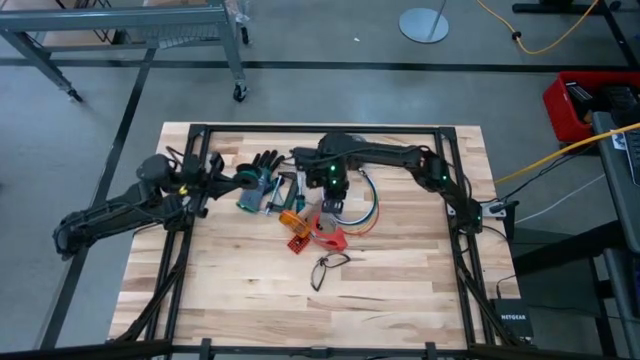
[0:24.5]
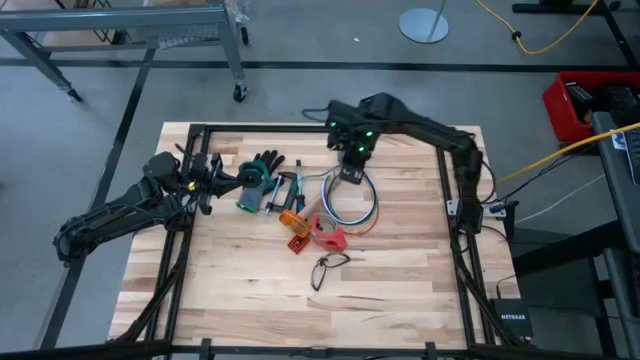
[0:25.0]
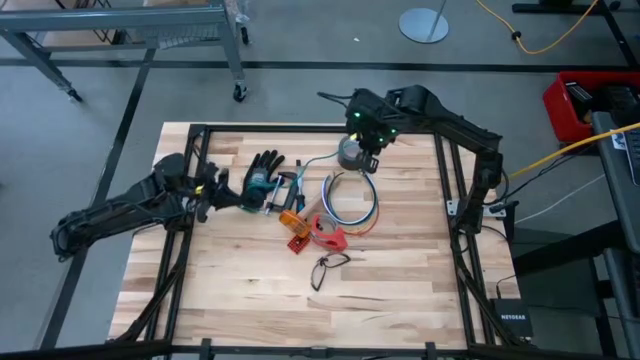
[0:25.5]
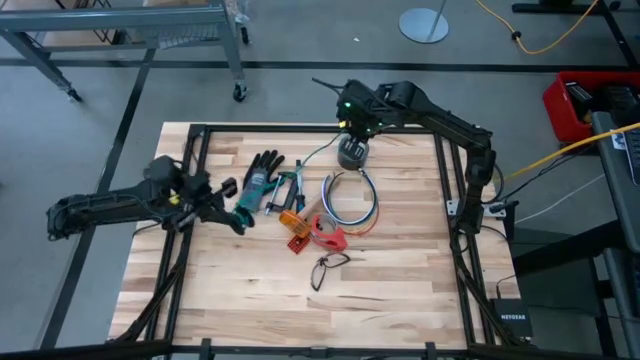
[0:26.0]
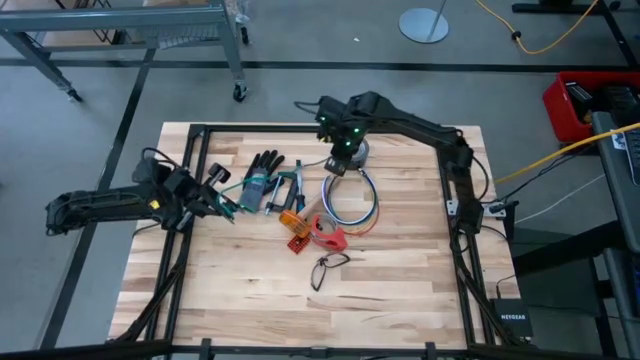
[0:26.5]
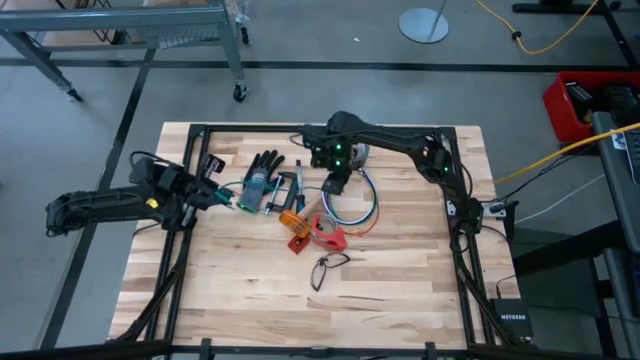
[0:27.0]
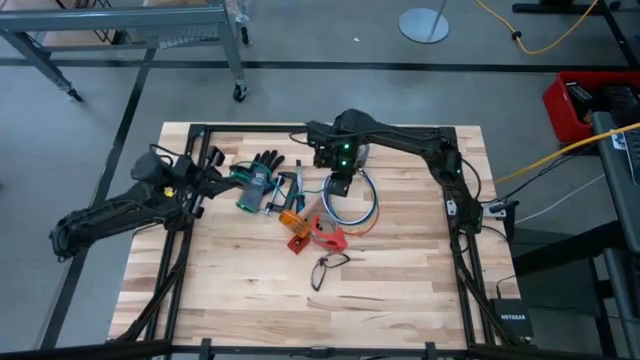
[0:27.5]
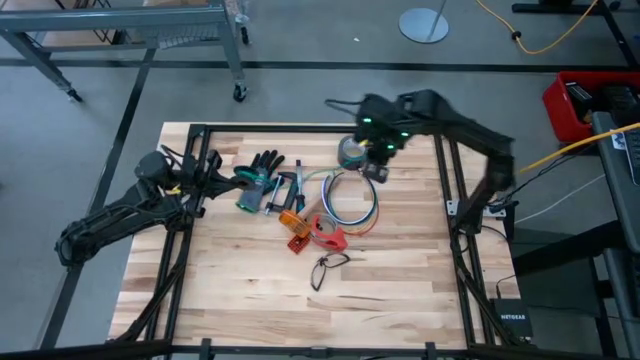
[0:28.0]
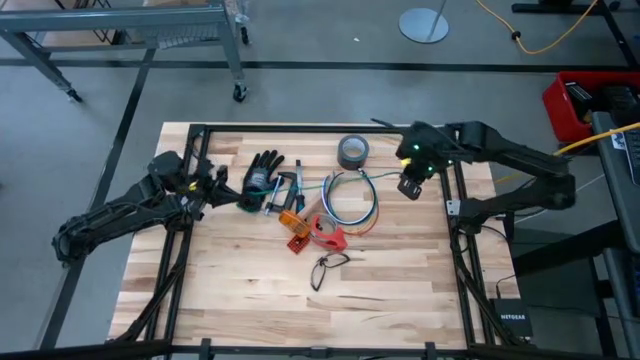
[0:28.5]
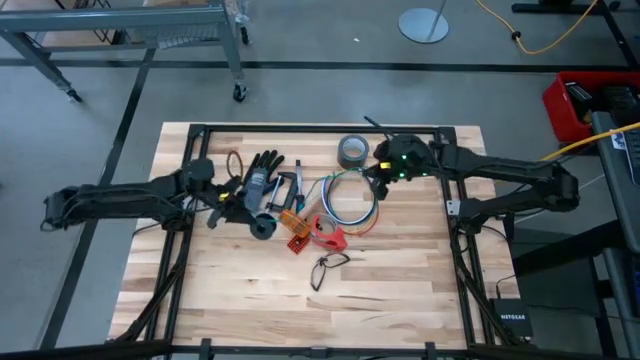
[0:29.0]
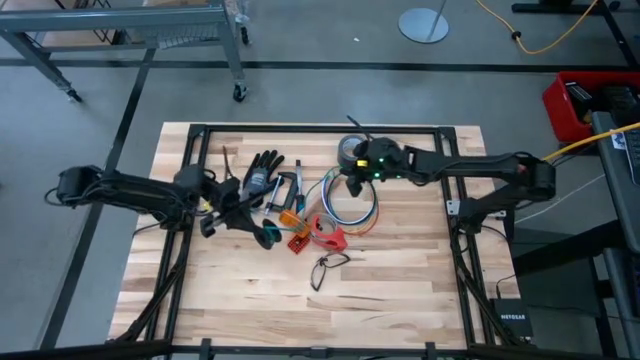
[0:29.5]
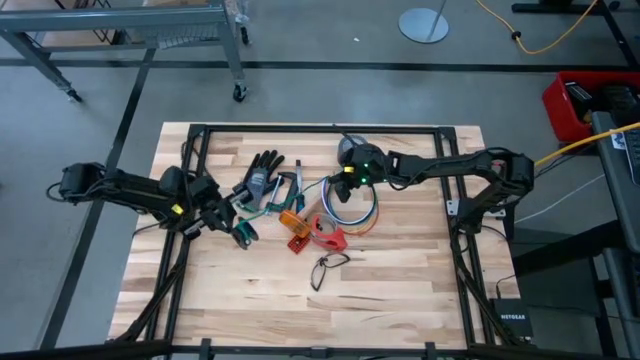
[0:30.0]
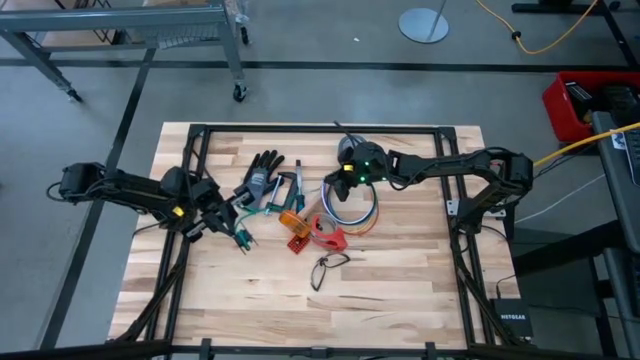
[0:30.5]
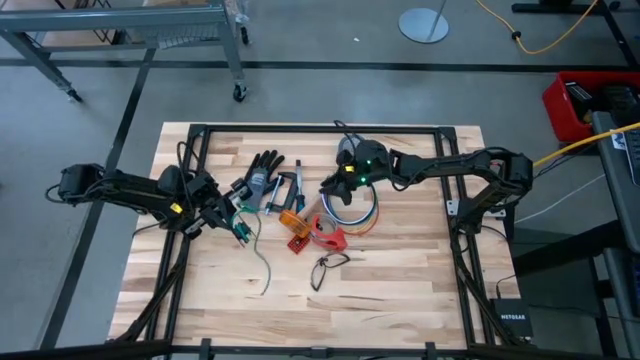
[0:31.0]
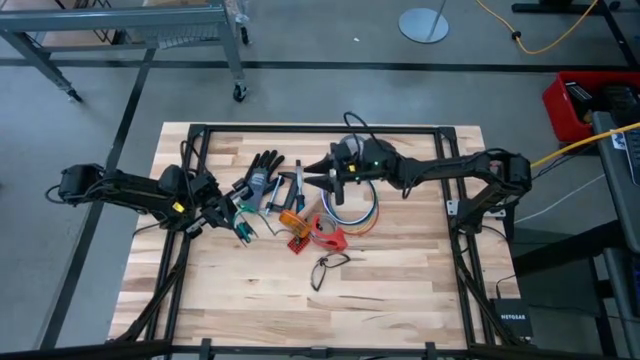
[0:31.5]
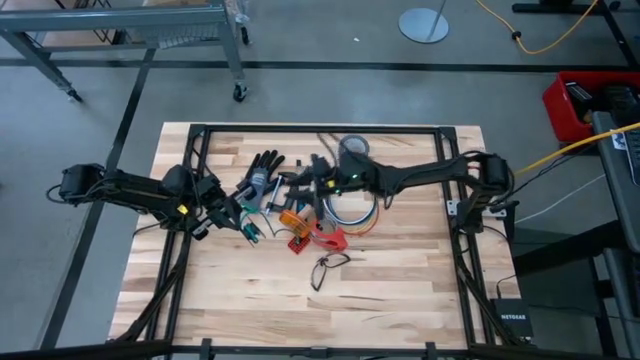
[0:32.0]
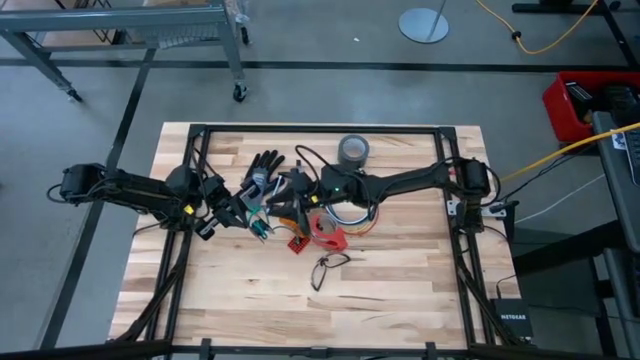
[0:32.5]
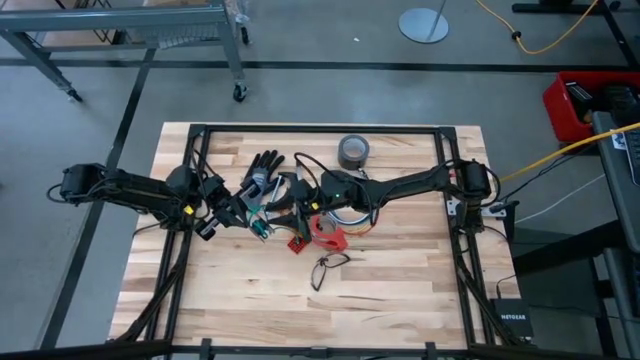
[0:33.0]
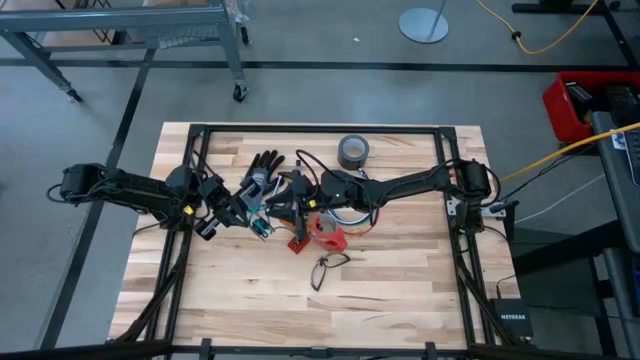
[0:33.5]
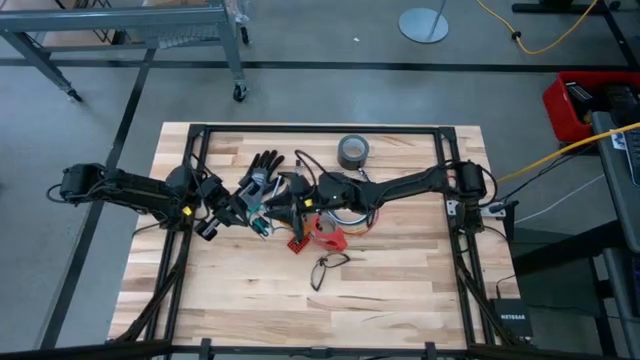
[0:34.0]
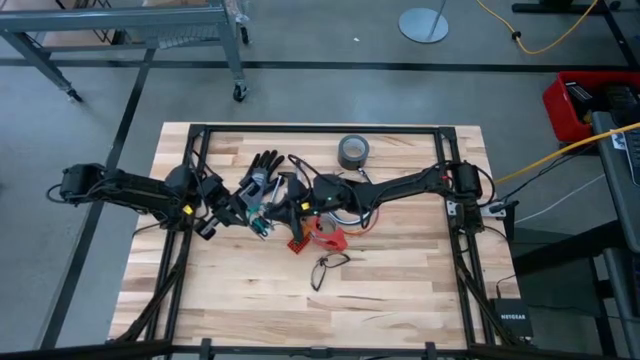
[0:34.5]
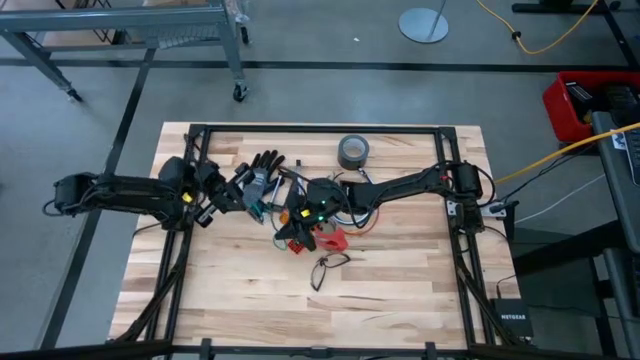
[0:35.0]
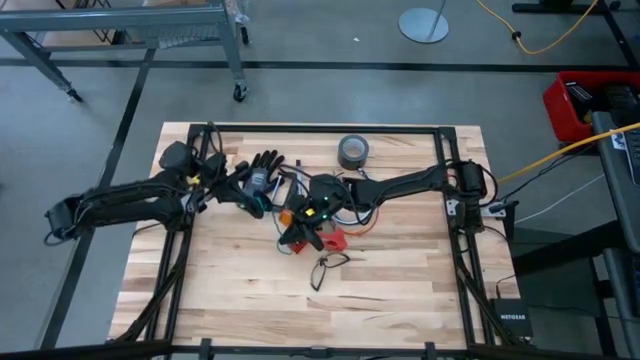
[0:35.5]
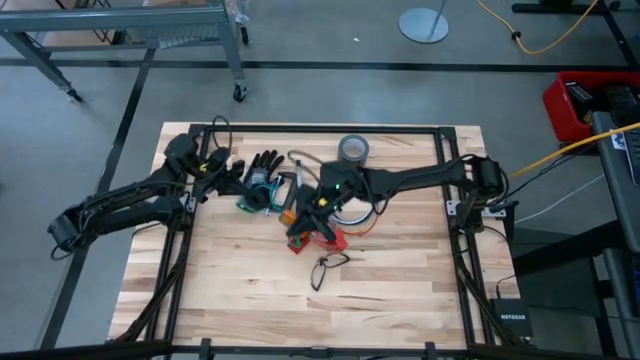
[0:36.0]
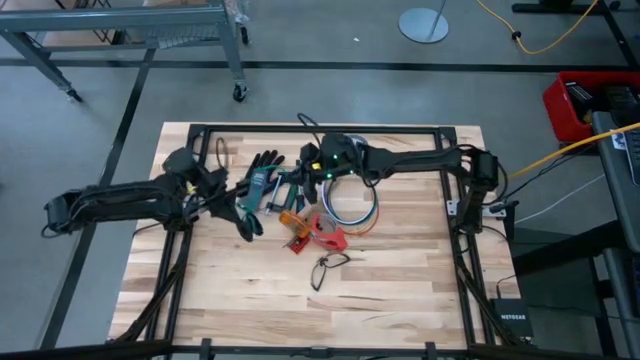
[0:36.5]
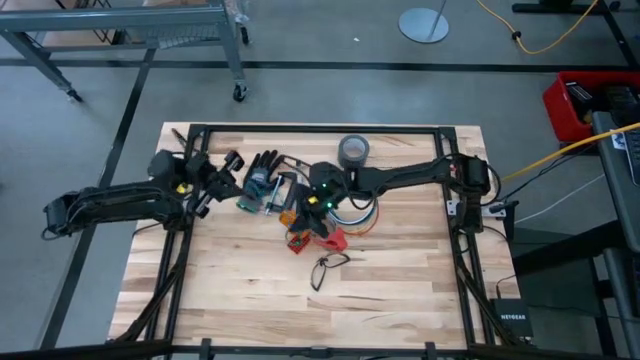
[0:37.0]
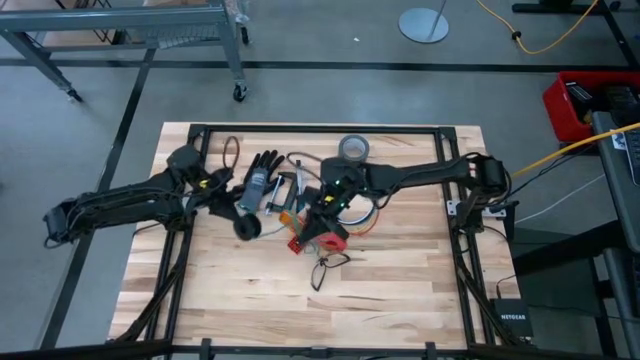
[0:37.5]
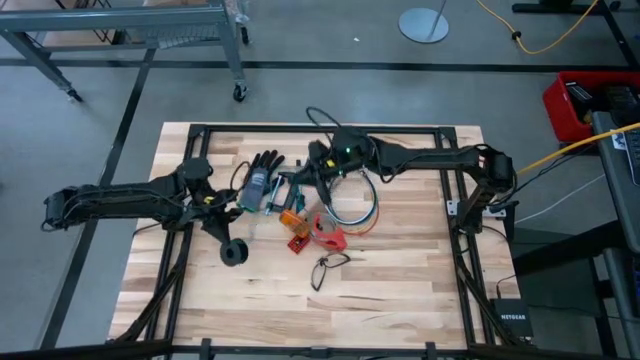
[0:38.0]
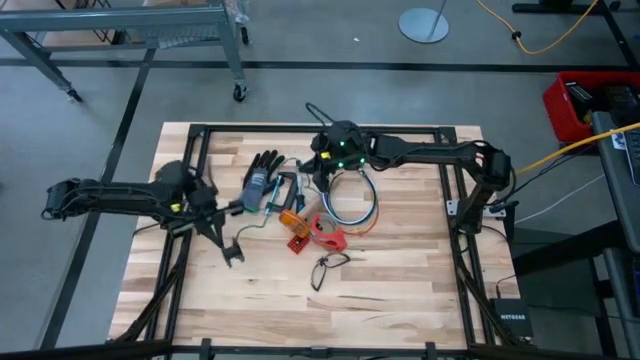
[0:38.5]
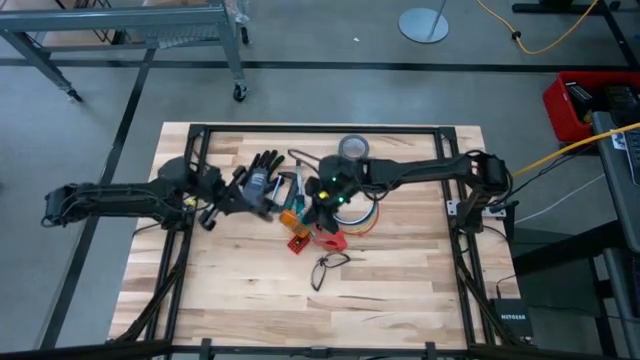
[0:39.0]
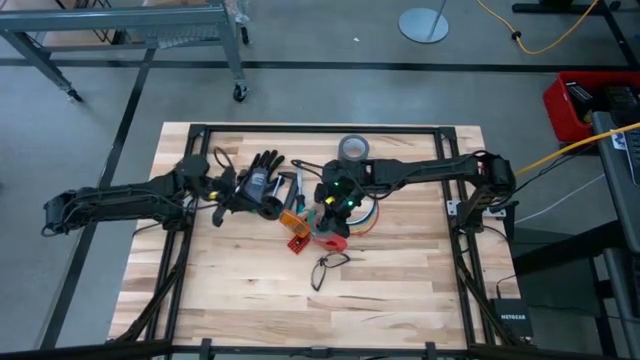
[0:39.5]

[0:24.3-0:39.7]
Task: Coil cords
Uncoil the green wire from the spool
